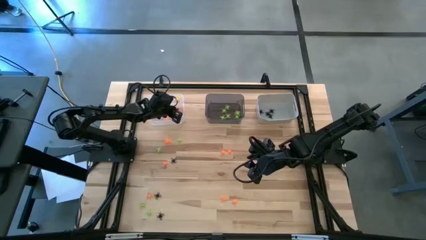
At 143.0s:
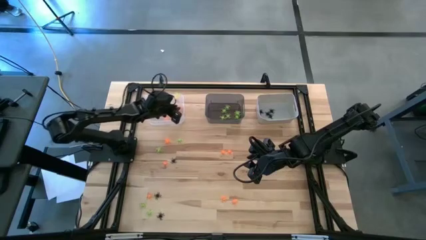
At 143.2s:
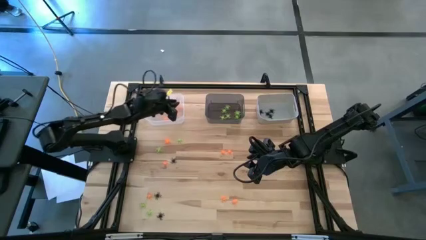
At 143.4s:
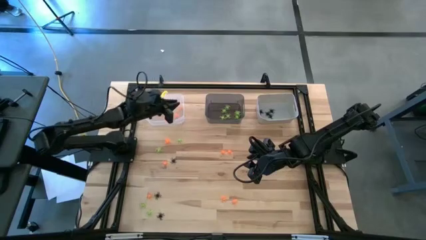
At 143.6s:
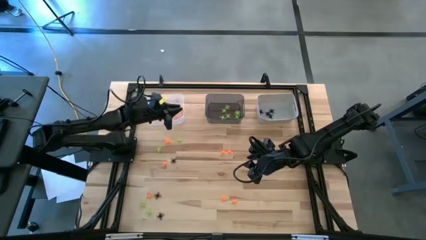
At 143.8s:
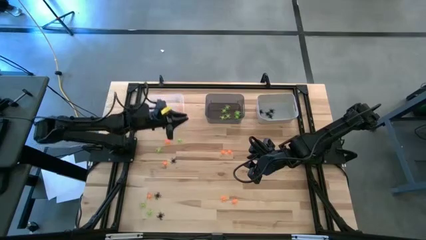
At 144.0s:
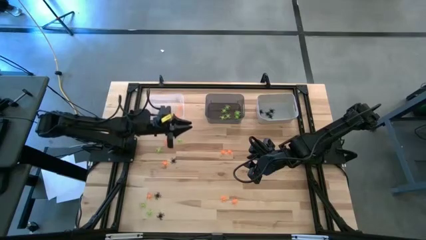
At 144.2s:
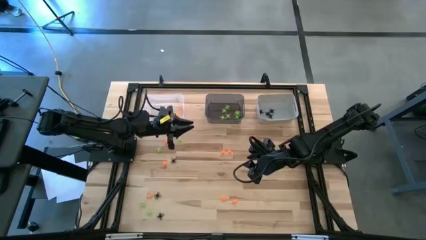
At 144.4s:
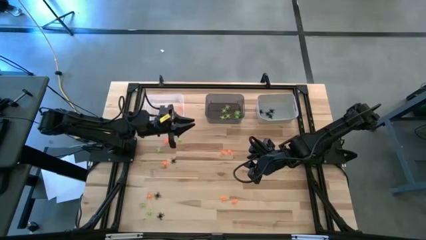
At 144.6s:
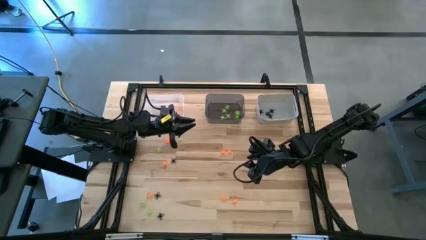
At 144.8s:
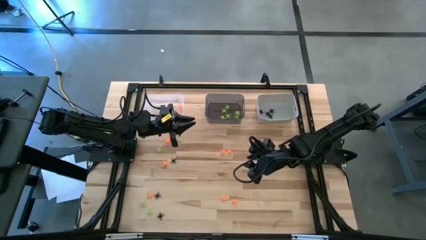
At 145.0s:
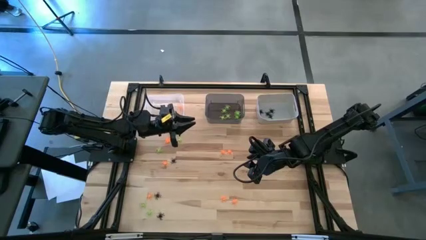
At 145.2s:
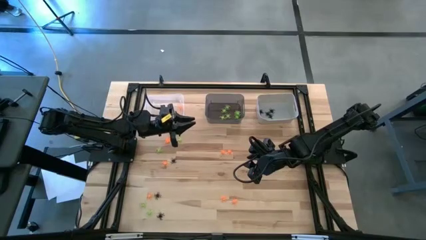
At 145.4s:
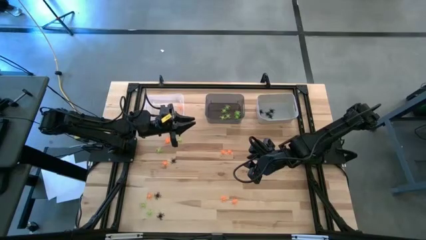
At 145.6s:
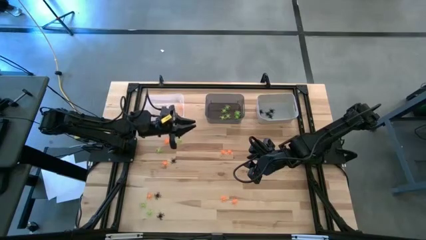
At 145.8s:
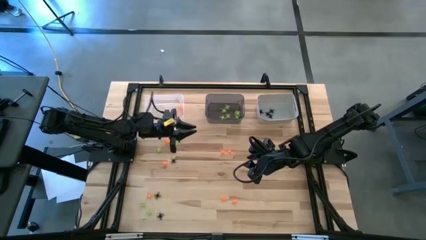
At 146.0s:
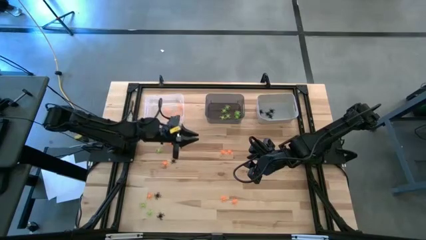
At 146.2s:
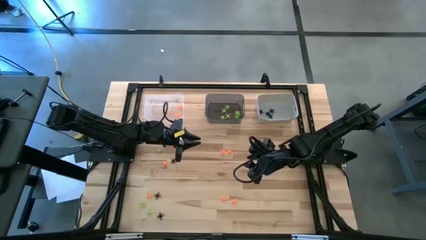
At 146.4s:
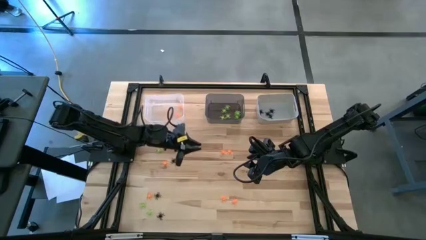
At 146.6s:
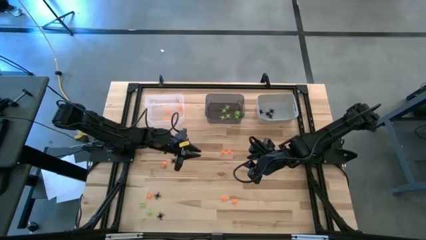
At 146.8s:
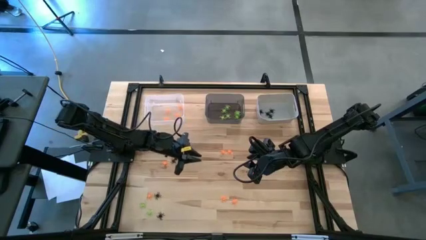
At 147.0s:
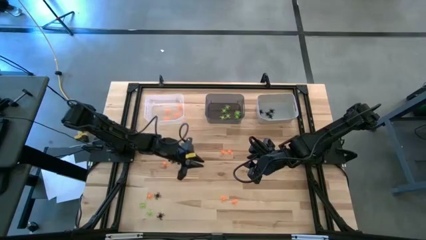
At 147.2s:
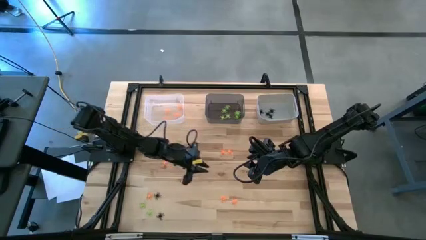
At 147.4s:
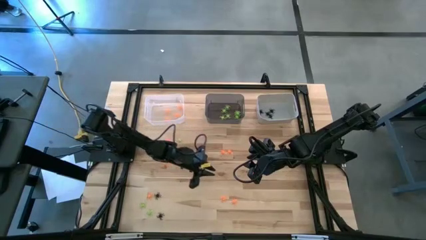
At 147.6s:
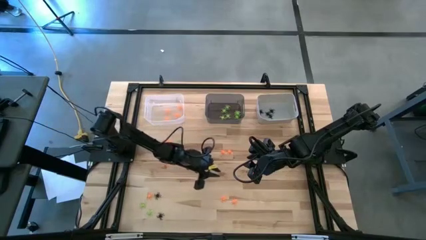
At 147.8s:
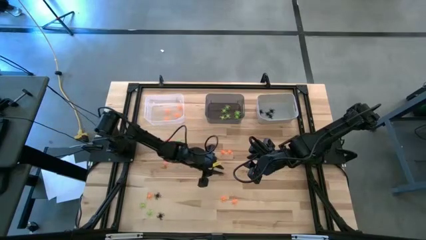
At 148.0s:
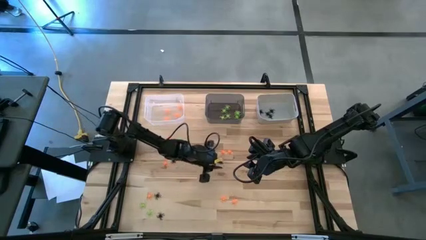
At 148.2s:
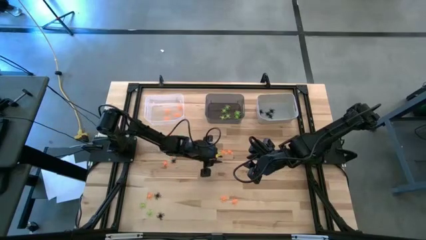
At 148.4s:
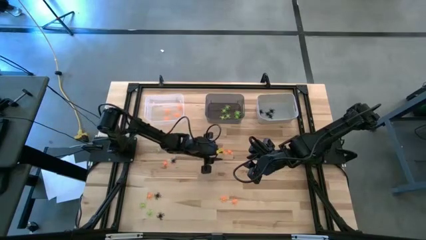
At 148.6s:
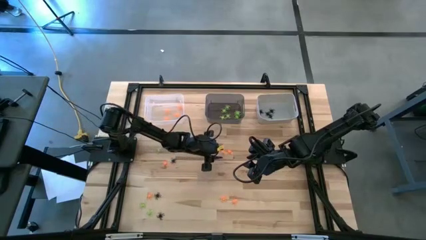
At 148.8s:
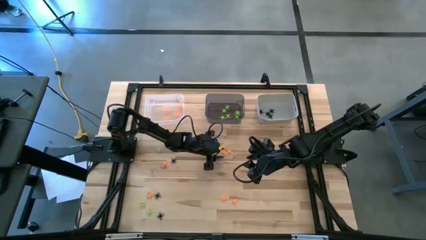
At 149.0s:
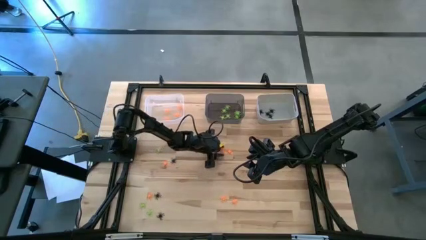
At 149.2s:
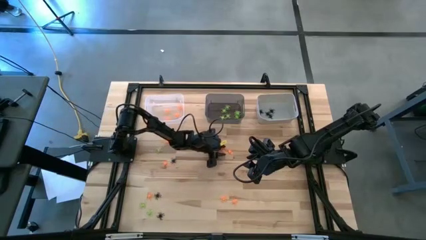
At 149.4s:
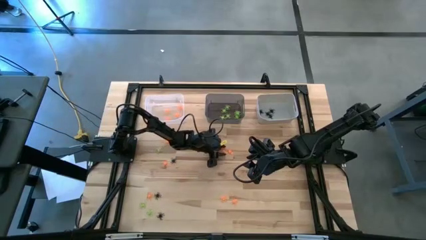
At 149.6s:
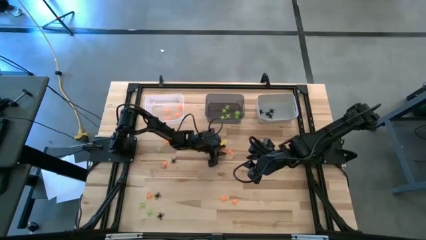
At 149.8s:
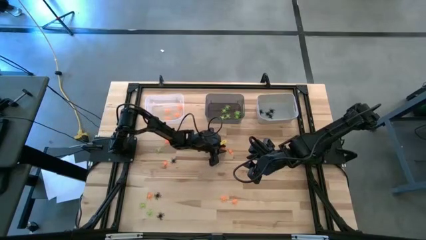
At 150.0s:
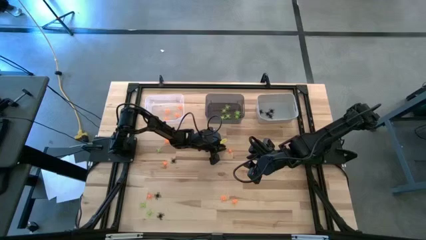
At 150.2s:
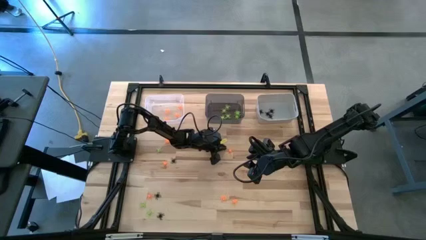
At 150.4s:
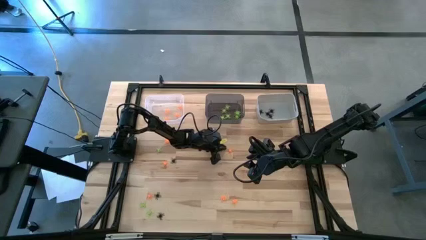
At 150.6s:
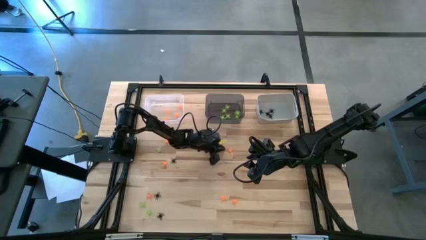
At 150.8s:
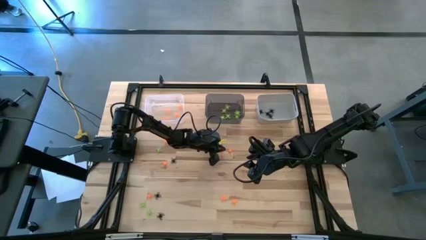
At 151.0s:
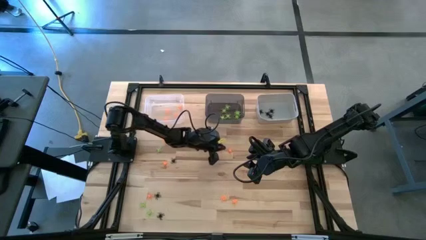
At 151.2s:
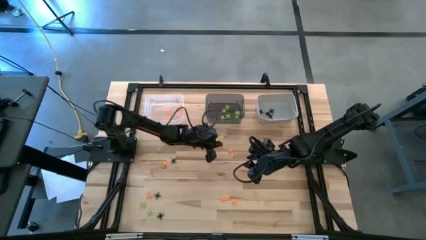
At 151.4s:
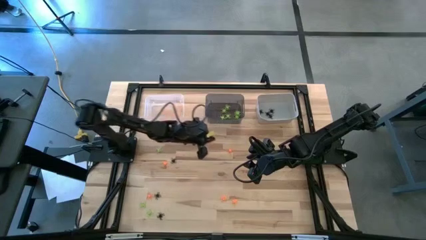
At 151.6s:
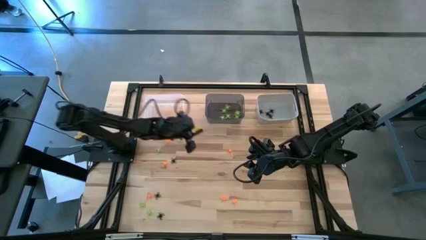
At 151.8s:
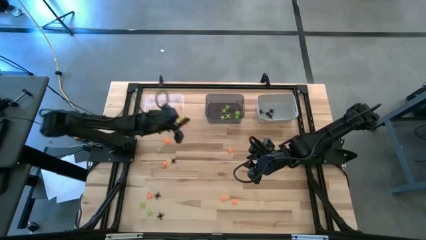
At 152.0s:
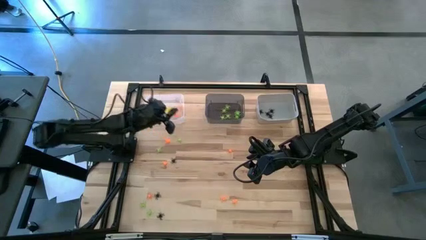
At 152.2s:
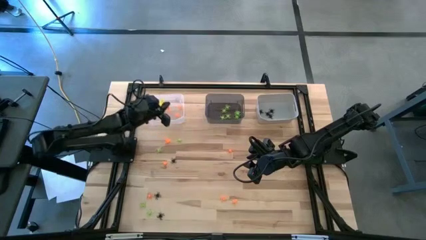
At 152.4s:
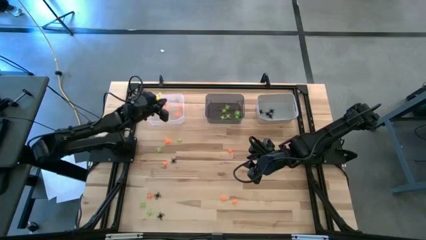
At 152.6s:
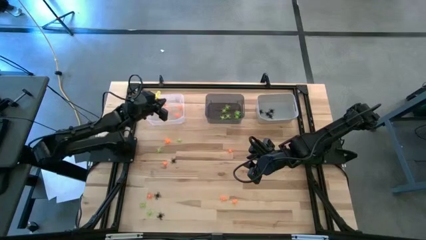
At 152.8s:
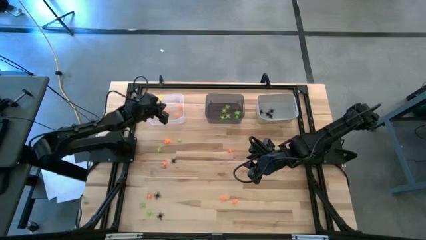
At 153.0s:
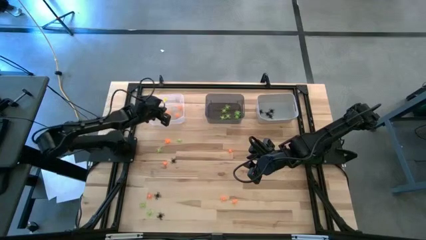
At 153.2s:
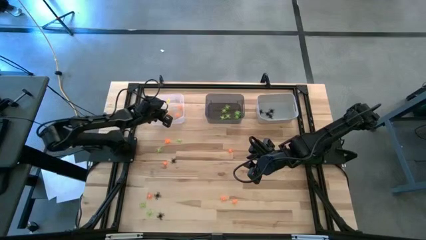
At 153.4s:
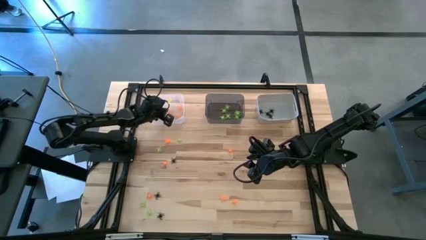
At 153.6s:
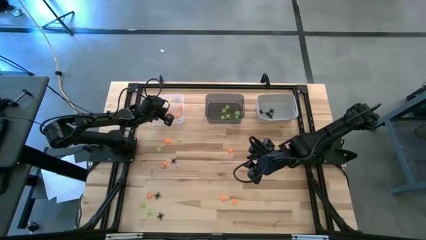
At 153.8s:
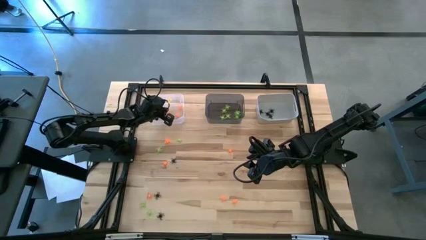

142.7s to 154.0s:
Task: Sort Halloween decoration
Put the orange spider toy into the transparent bin

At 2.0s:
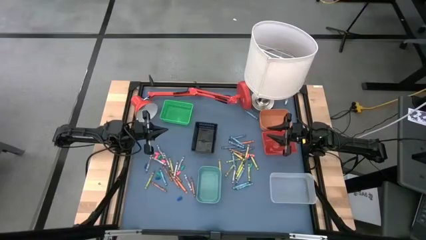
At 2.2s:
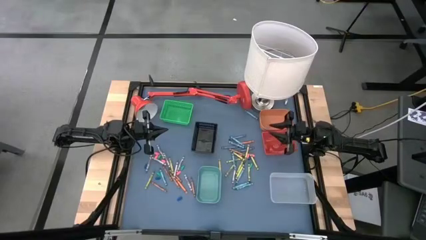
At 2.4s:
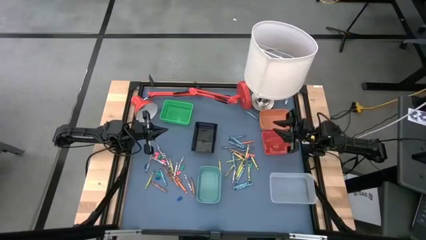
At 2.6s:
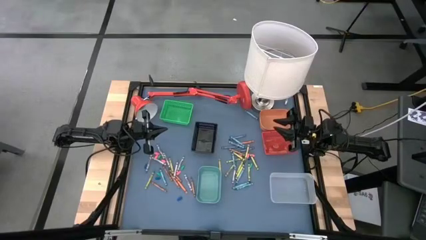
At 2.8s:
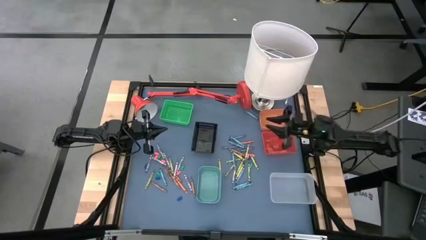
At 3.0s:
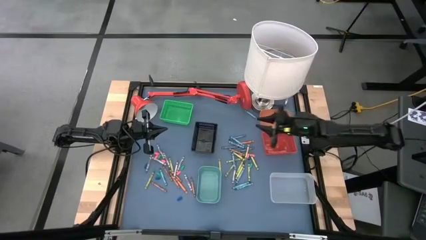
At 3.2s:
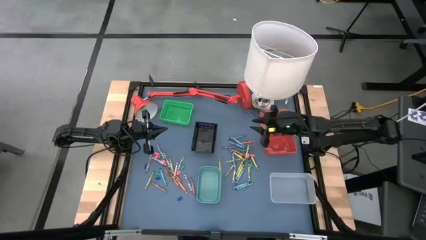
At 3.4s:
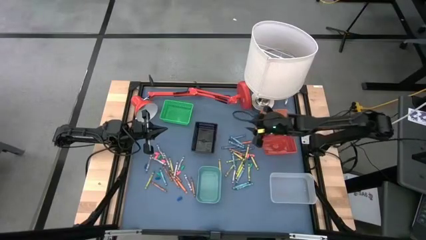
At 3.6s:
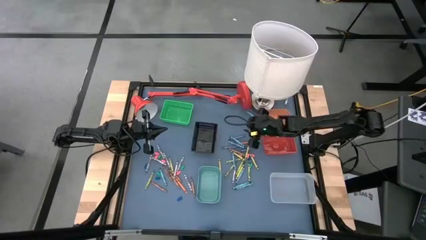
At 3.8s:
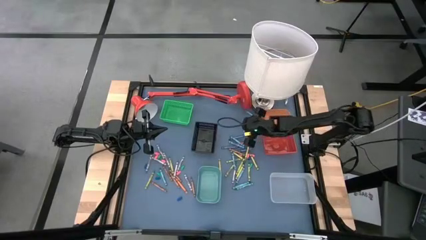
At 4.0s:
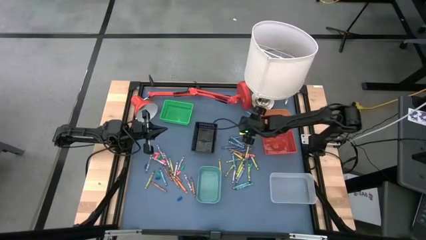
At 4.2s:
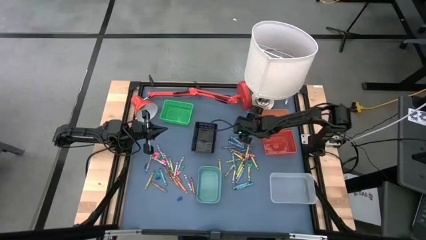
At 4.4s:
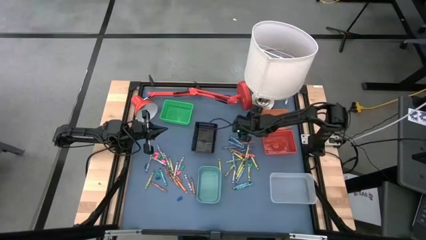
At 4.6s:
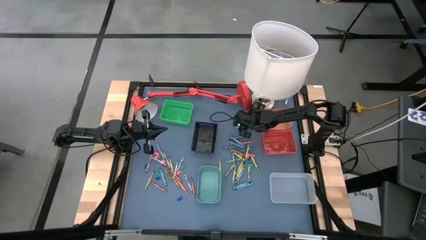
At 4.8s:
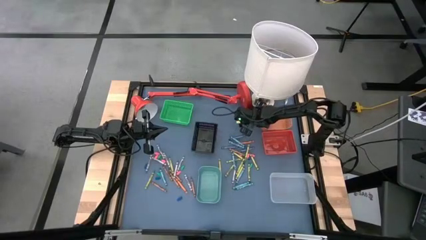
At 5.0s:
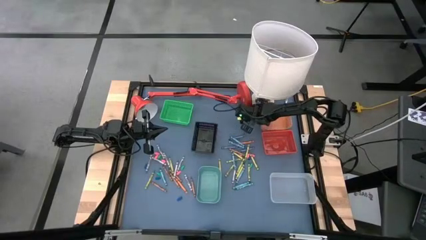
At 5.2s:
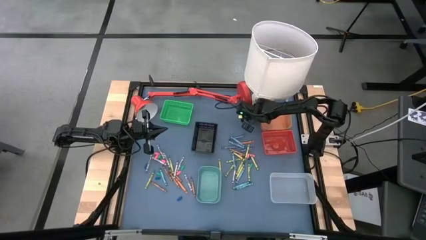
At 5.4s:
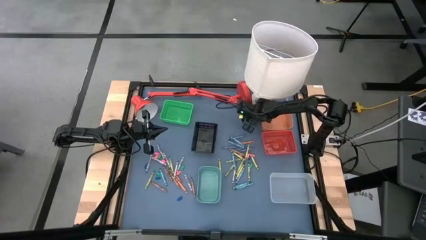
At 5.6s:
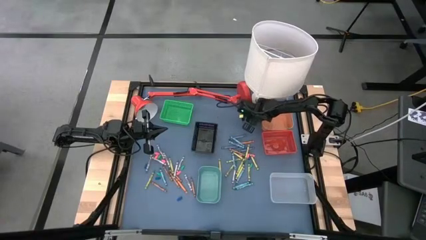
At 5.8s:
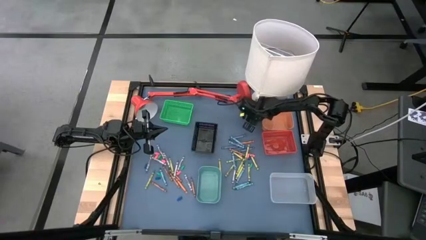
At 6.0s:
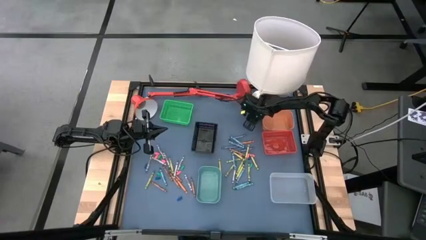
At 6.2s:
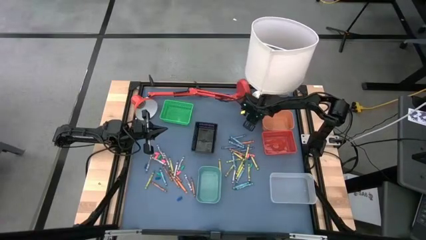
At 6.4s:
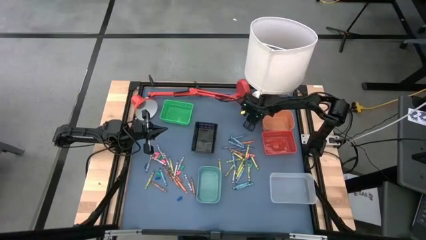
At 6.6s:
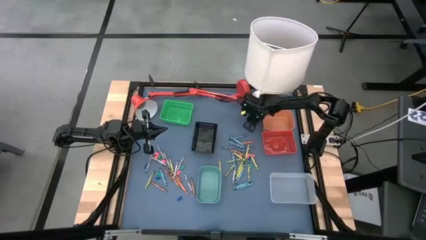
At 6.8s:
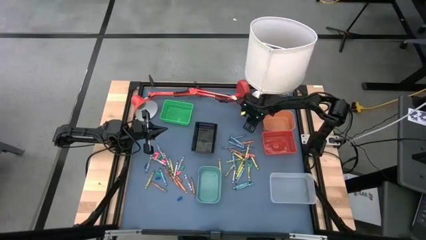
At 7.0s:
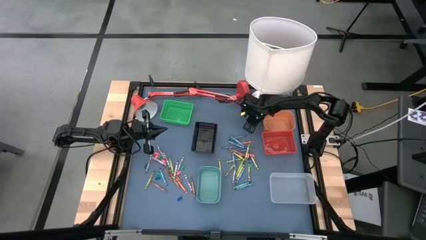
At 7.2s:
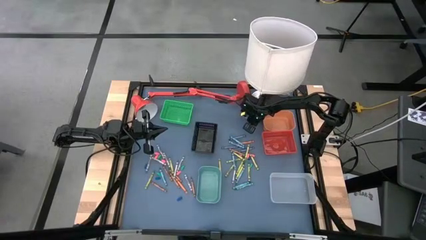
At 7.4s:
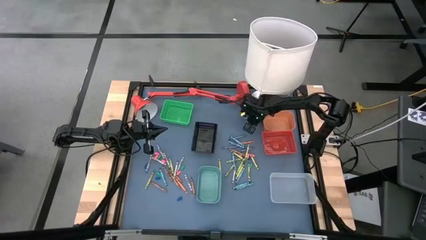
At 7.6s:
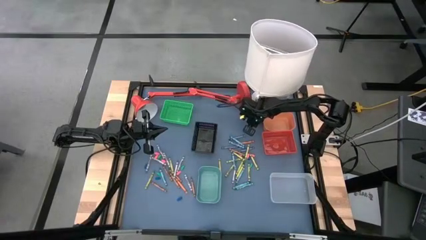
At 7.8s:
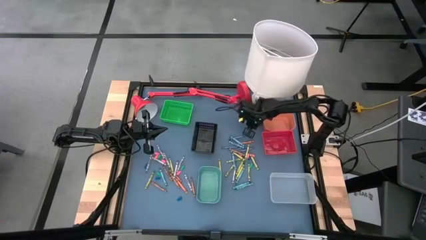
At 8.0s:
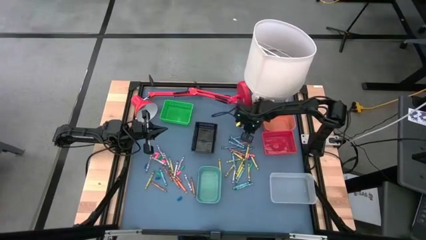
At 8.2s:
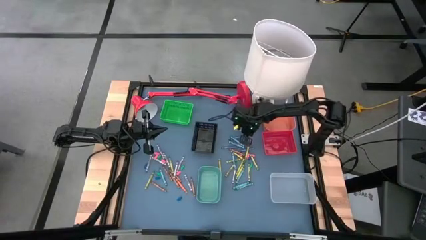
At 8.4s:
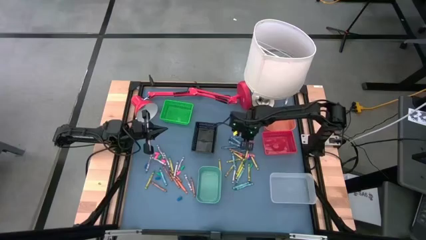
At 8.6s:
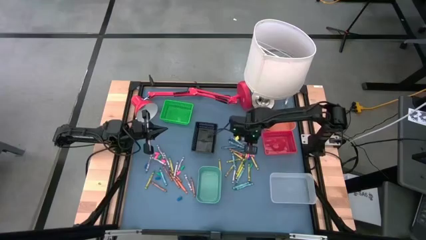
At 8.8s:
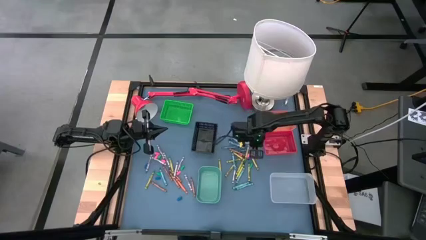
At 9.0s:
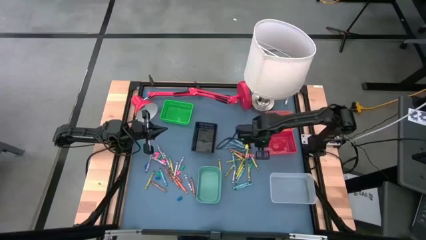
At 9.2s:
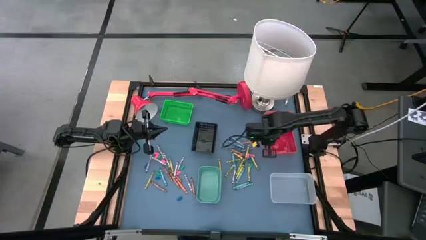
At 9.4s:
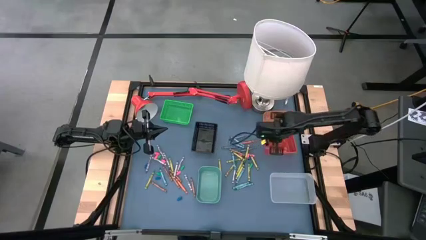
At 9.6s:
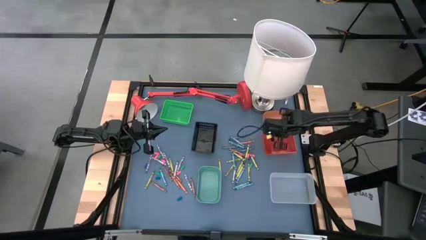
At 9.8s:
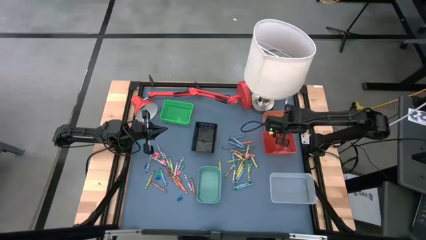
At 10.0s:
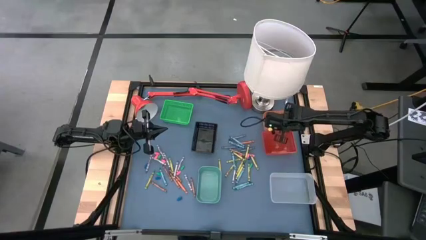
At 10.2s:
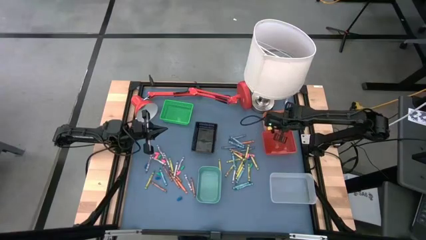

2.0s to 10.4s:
Task: Sort crayons
Put the blue green crayon into the orange bin
